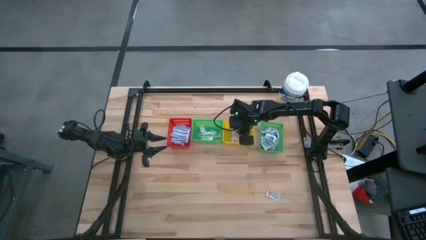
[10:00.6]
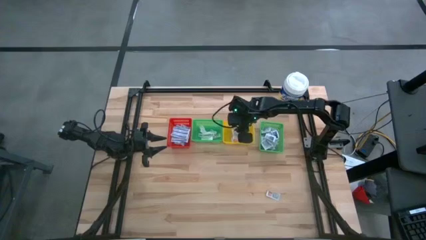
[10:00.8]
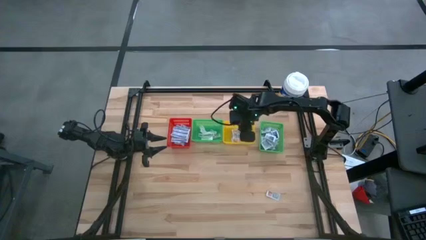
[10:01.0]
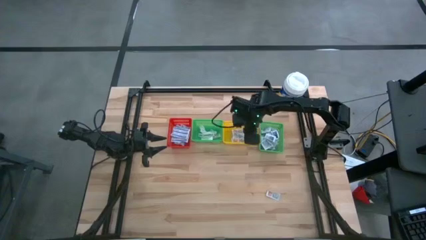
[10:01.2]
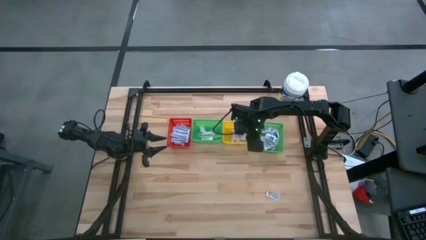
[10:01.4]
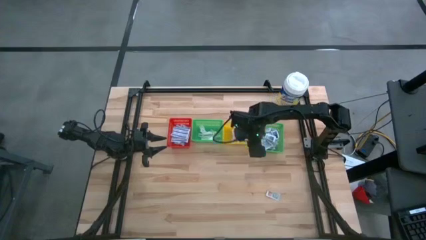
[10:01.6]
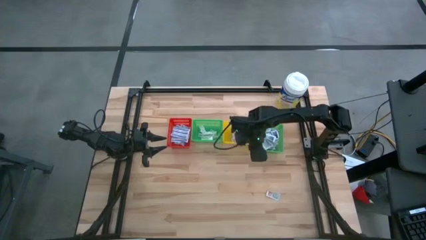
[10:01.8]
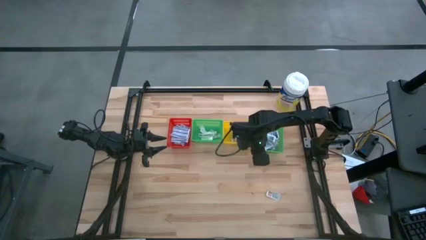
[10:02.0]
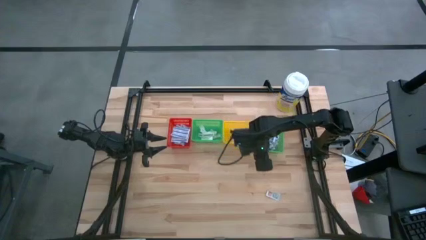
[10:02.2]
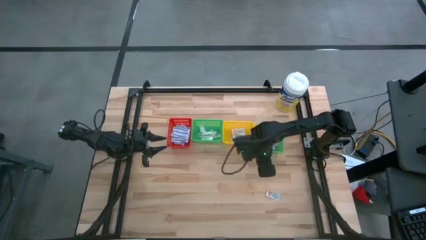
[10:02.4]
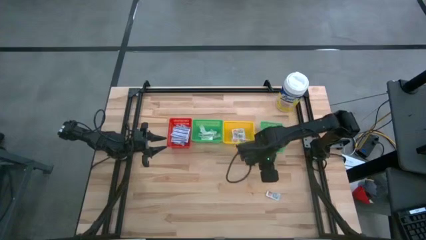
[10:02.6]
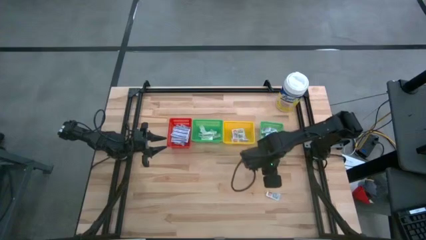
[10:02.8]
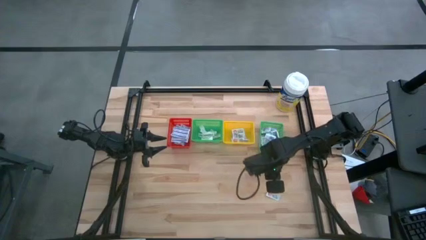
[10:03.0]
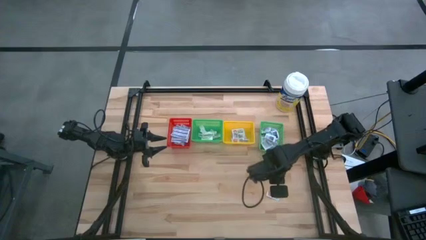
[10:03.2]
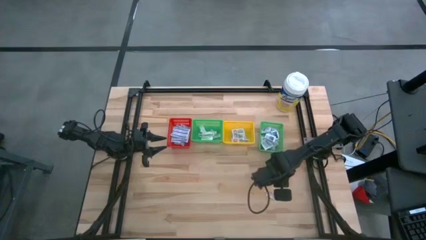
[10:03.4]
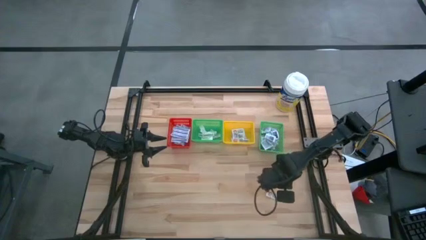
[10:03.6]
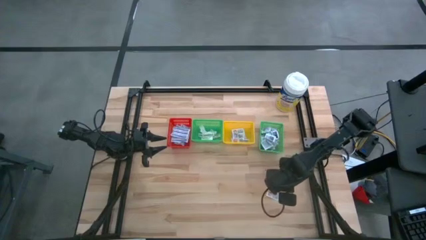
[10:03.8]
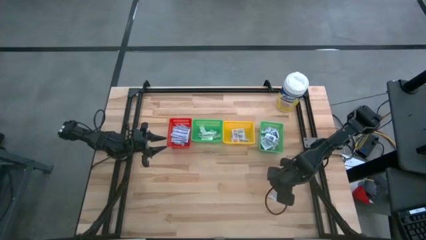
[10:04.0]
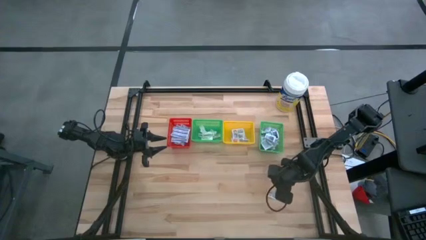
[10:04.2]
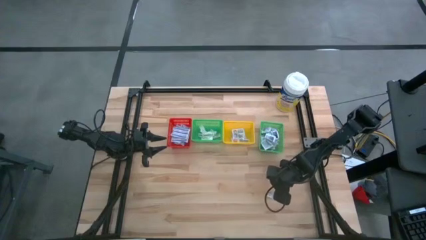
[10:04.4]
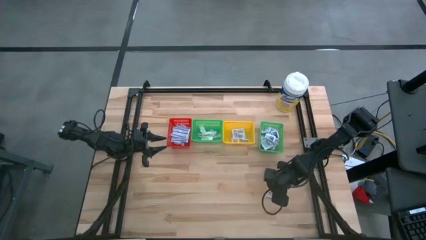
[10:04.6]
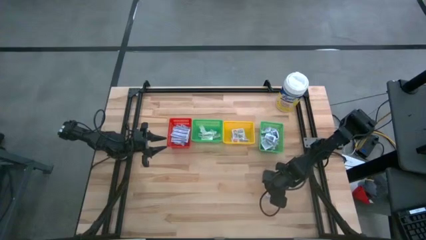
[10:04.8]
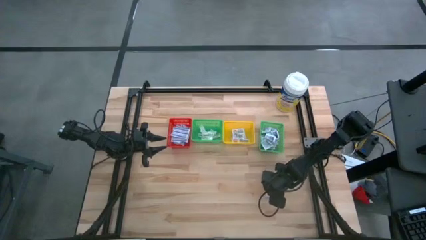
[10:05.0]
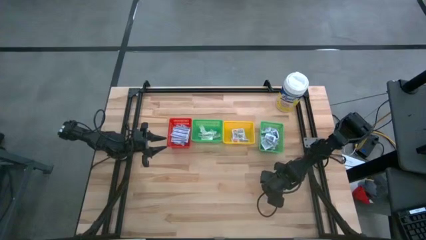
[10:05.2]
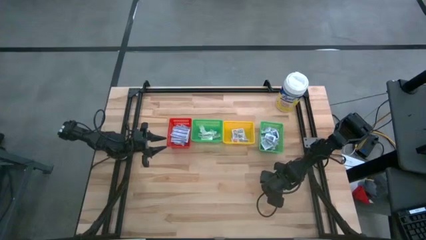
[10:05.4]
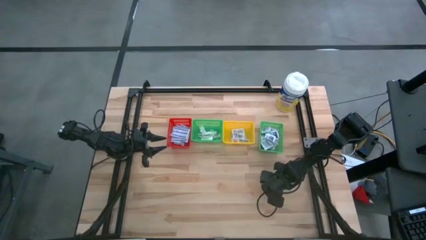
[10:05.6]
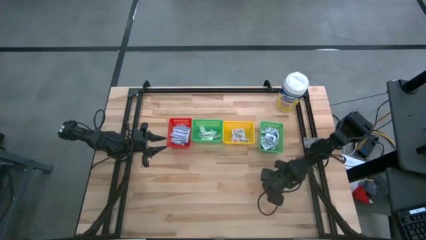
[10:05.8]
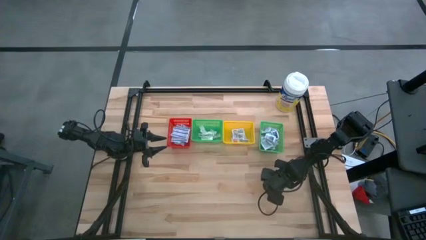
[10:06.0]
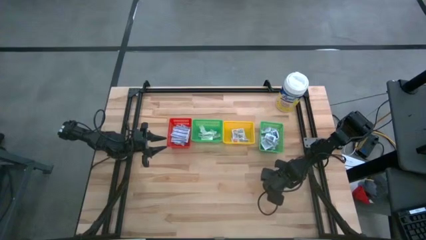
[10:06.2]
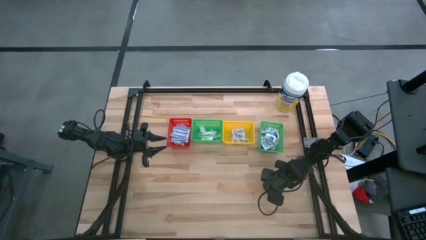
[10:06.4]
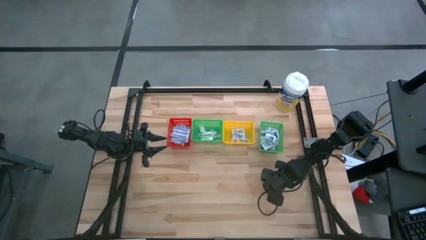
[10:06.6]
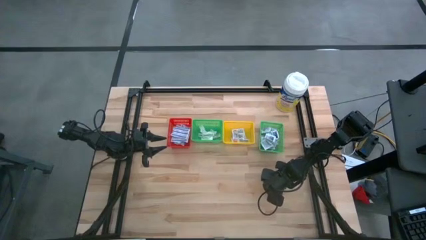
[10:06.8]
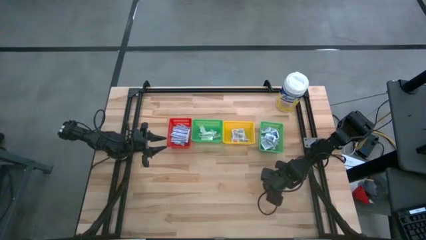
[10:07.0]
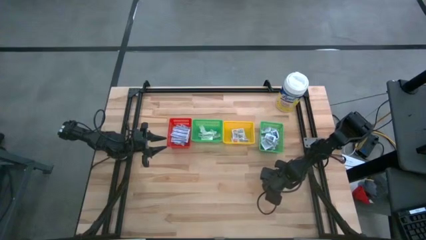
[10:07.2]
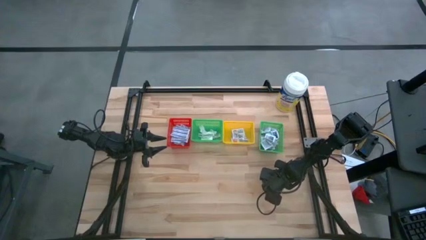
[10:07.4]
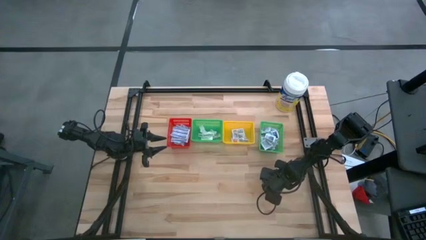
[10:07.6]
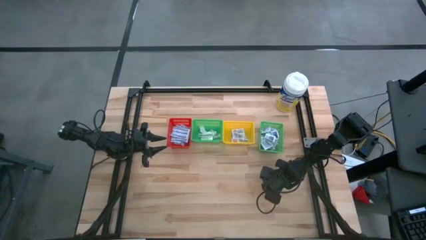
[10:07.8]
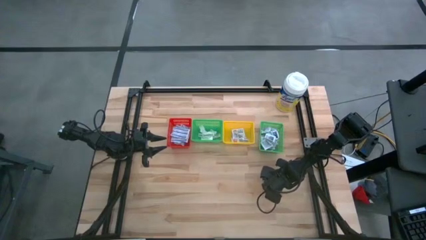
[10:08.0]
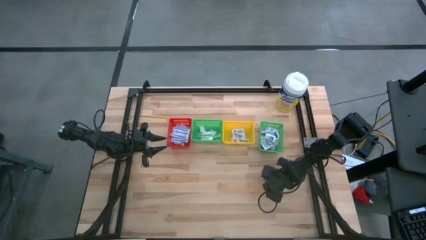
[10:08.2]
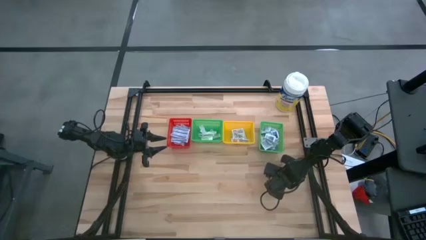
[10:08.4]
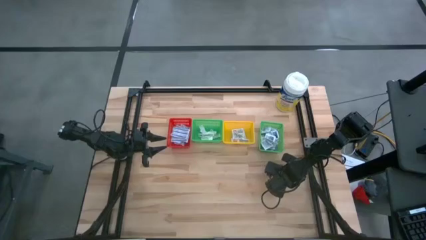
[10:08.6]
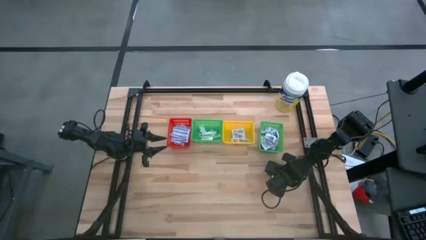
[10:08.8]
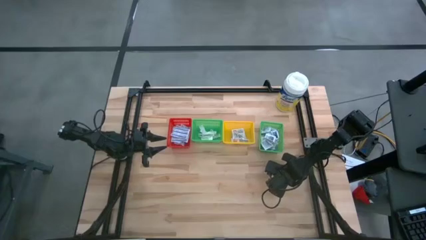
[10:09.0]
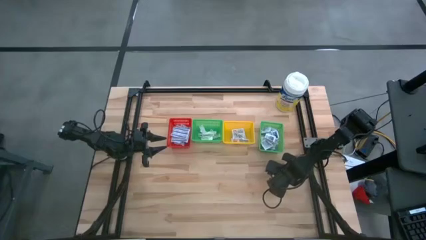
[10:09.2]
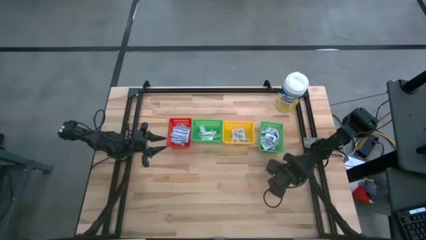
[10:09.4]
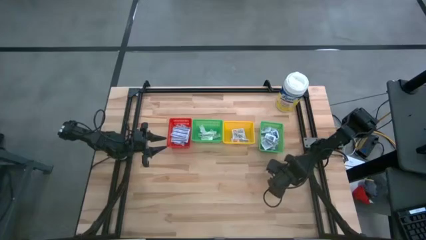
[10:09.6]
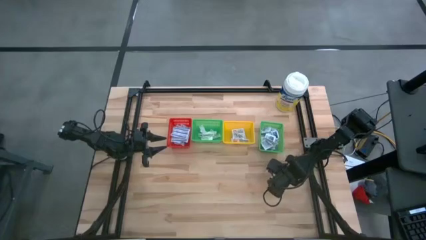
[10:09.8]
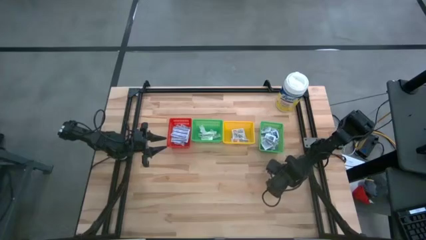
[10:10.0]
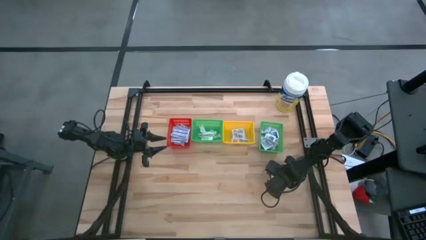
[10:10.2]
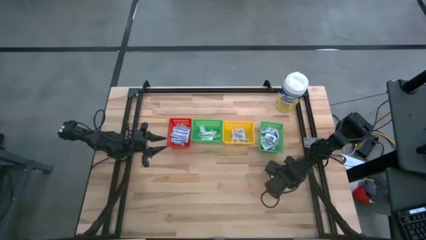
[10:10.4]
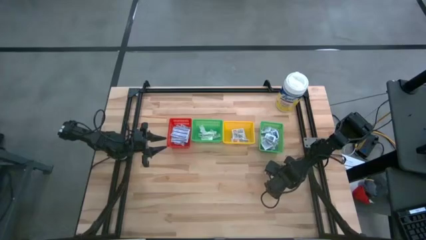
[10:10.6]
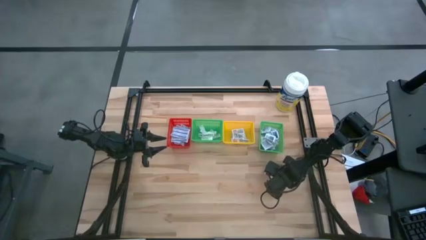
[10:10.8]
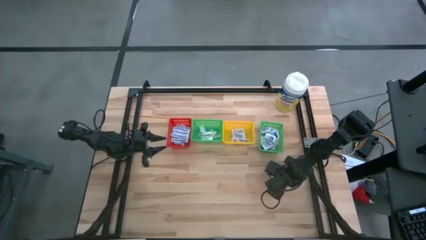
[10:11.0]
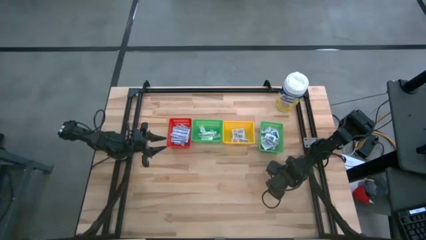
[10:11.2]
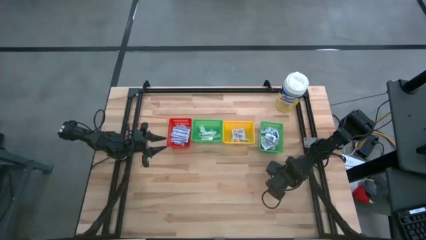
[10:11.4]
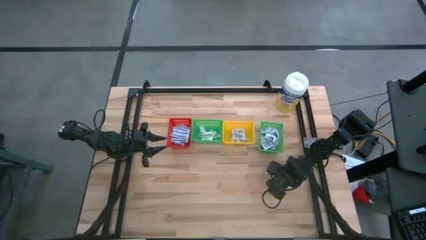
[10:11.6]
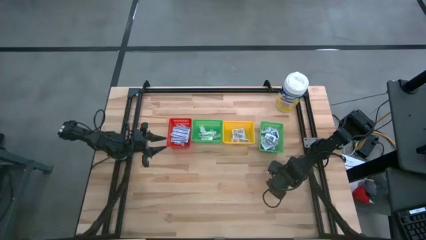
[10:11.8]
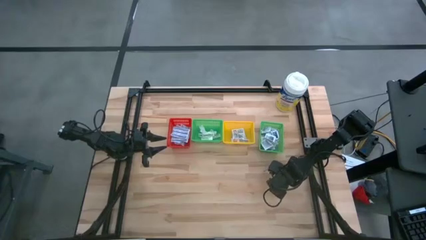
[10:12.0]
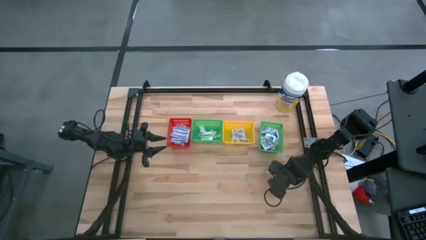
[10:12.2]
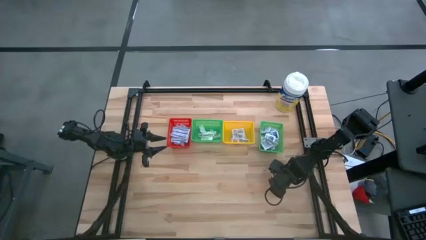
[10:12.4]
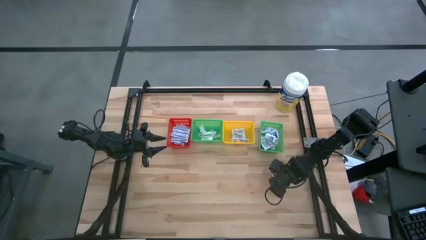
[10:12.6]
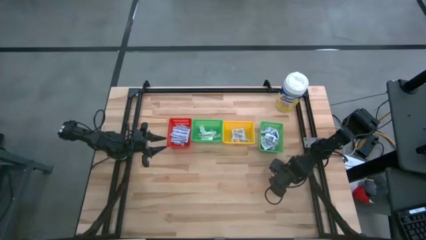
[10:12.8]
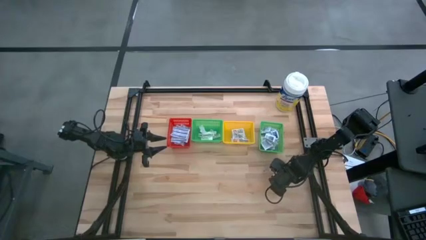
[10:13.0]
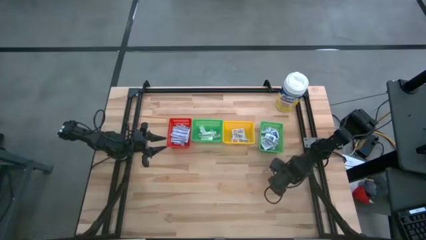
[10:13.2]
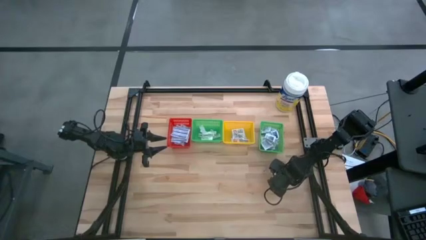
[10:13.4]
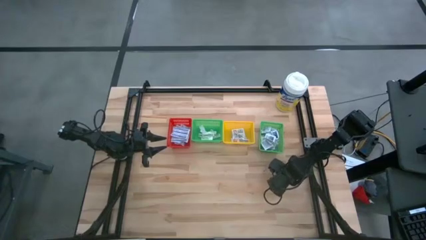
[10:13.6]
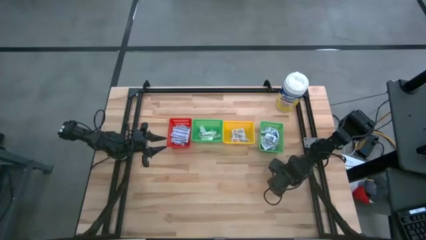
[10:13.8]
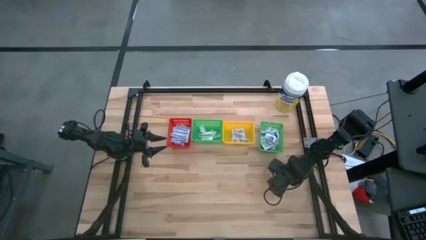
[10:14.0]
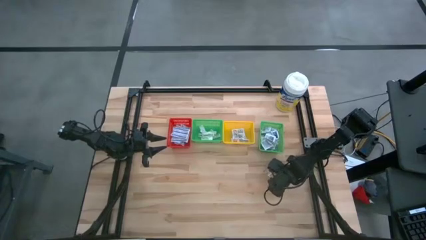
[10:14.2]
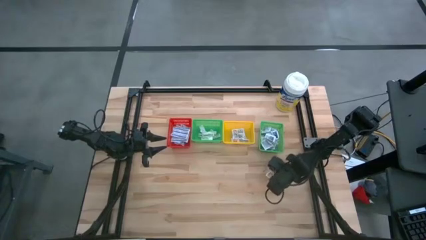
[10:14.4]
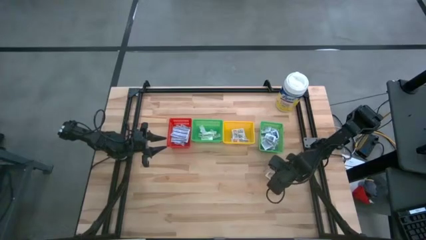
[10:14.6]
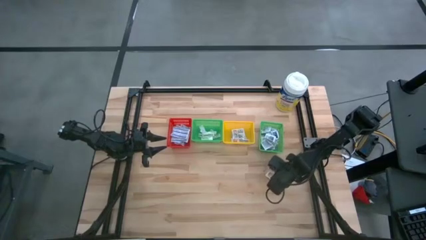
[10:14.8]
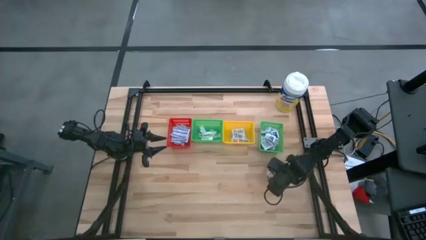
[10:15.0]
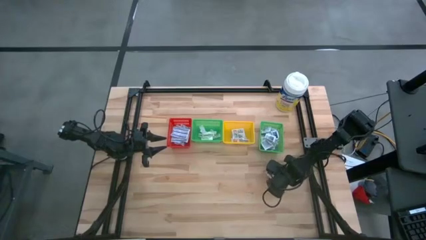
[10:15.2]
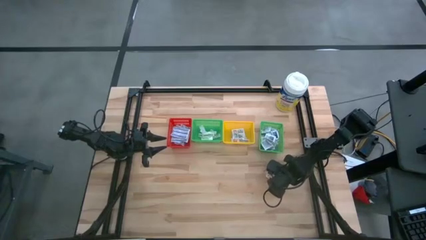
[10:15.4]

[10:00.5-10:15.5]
Task: Pick & Place First Aid Supplies
Put the orange ointment pack into the yellow bin

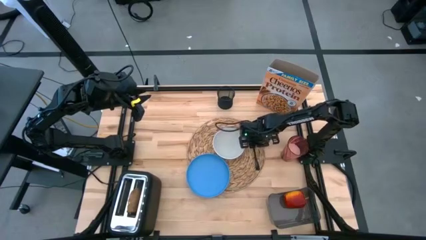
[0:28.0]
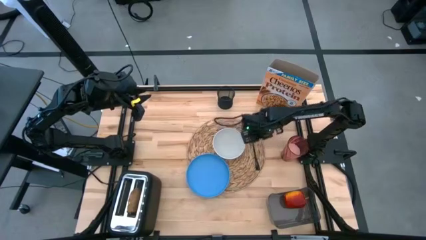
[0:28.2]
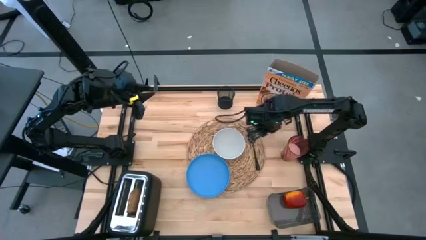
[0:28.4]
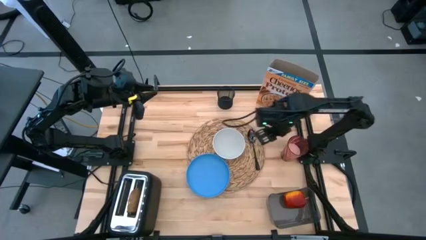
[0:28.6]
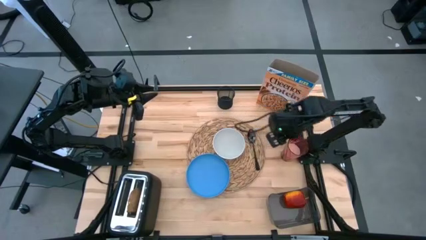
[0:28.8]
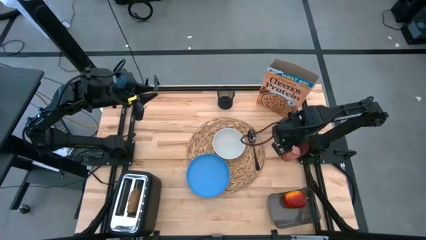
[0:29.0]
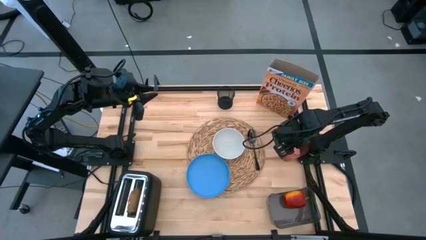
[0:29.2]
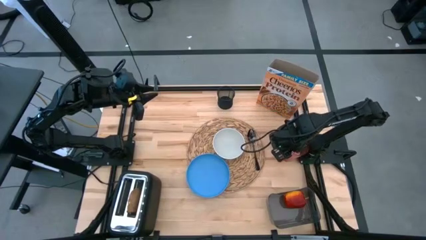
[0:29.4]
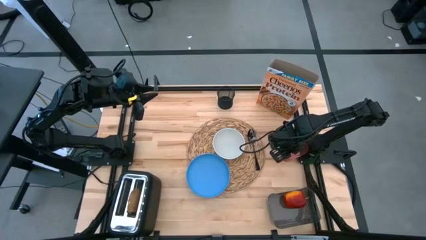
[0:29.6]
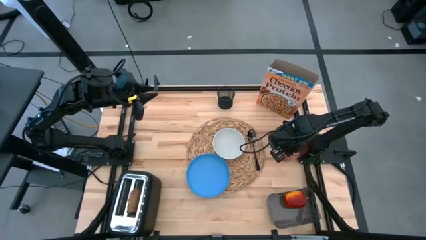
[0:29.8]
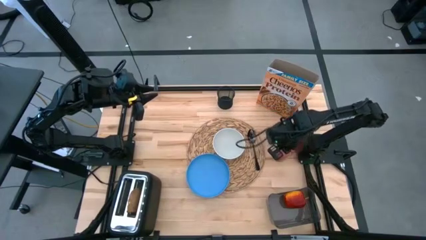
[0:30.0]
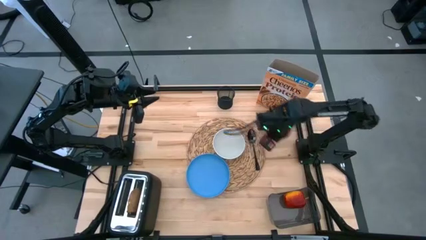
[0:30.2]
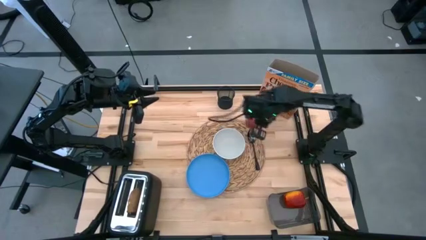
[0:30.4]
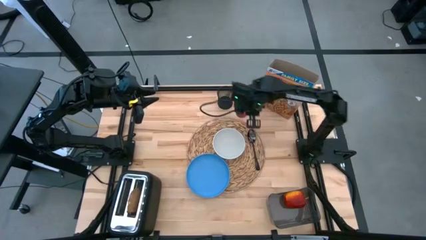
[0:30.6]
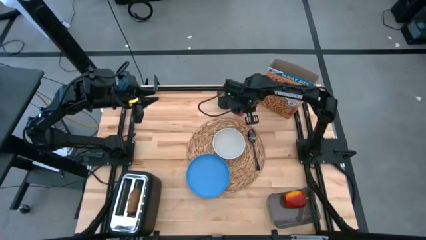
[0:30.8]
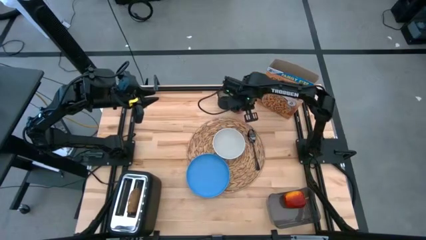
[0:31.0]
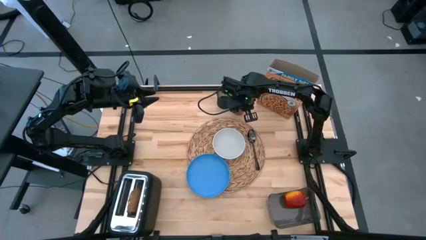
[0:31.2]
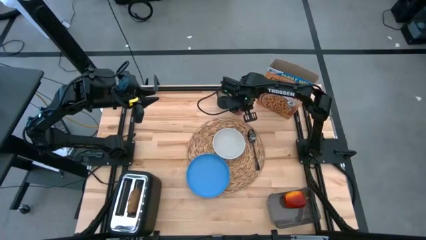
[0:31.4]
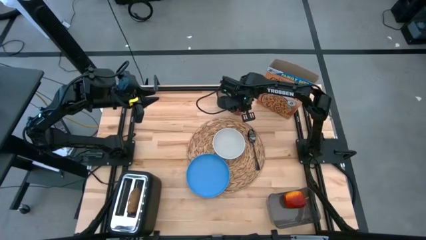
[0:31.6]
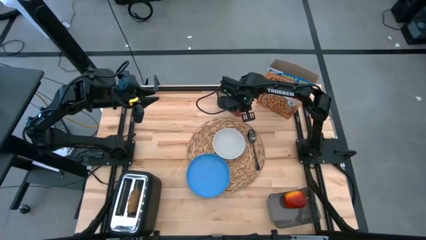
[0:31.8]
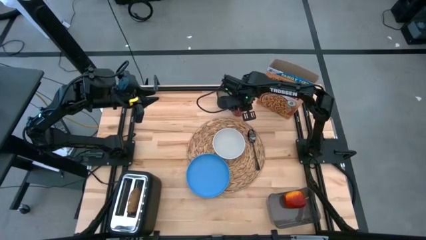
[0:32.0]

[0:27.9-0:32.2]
Task: Arrange a breakfast setting
Move the red glass of milk to the top of the brown placemat
